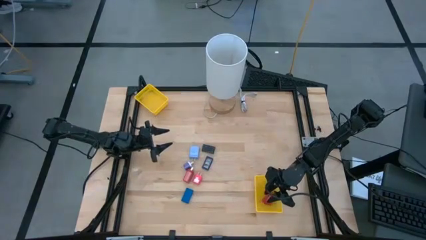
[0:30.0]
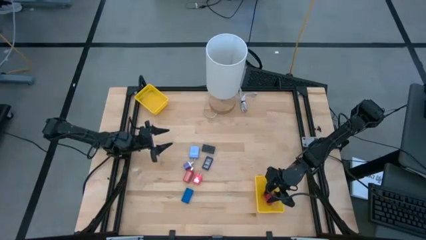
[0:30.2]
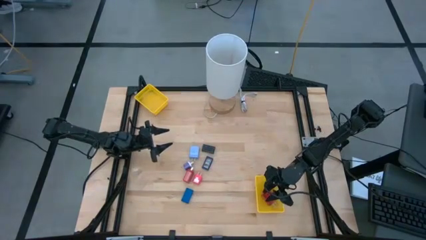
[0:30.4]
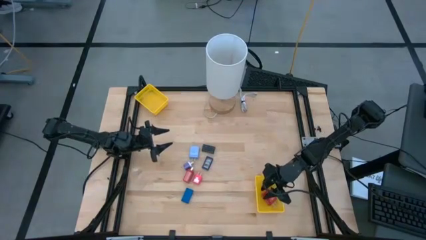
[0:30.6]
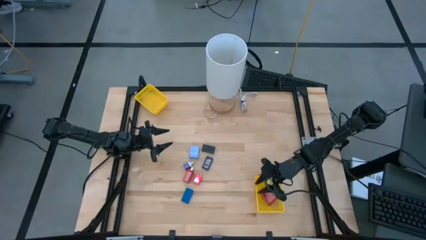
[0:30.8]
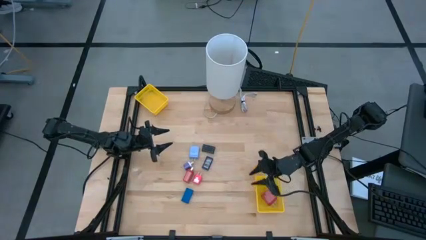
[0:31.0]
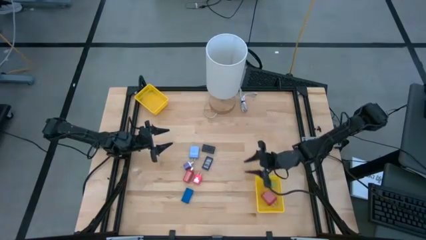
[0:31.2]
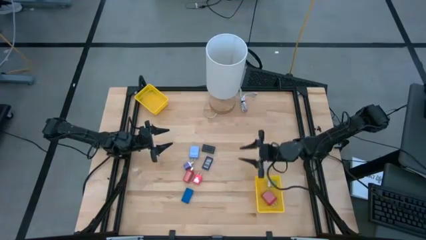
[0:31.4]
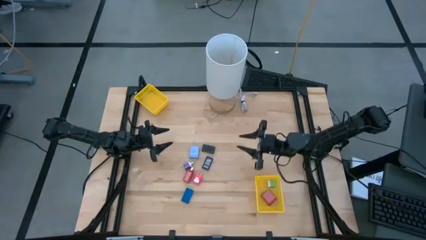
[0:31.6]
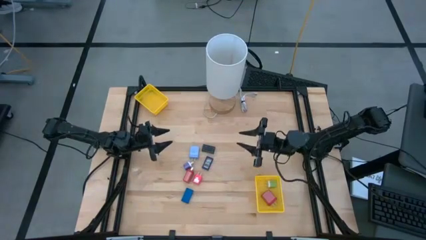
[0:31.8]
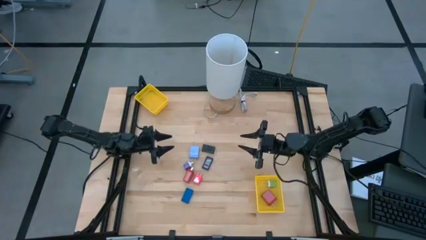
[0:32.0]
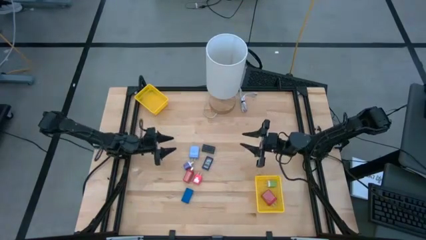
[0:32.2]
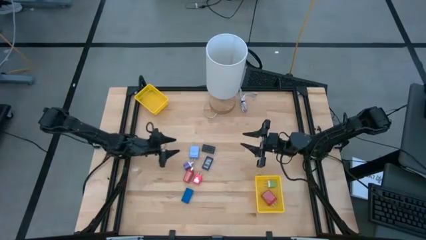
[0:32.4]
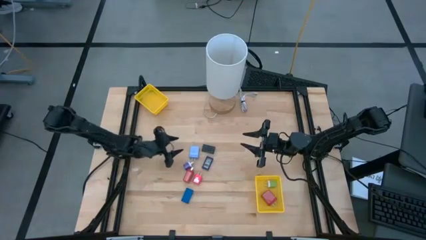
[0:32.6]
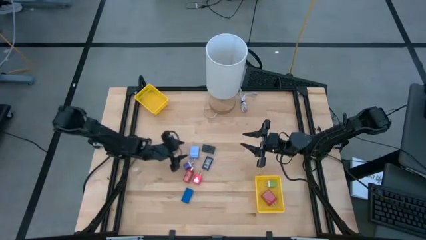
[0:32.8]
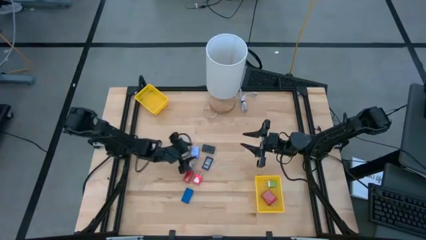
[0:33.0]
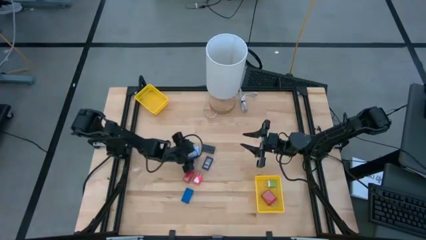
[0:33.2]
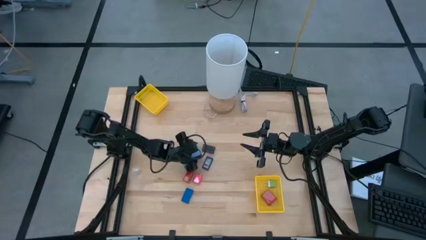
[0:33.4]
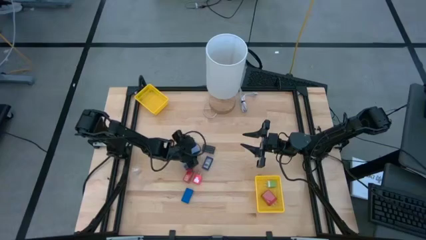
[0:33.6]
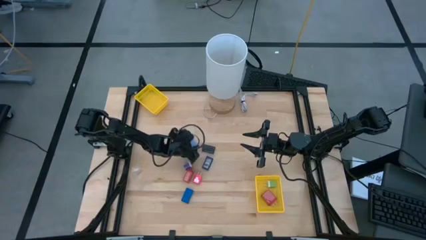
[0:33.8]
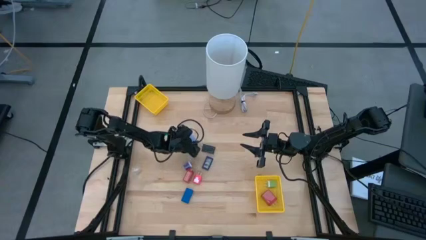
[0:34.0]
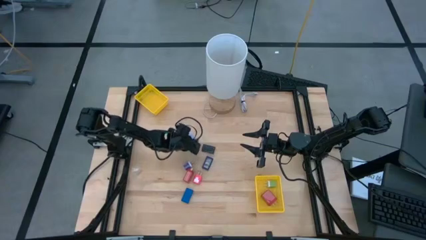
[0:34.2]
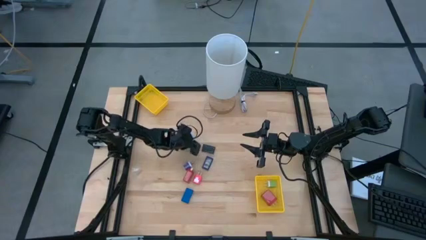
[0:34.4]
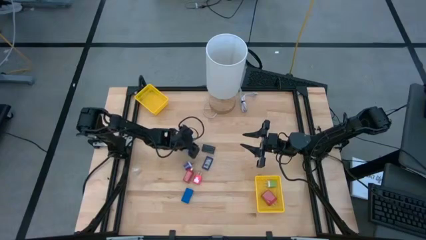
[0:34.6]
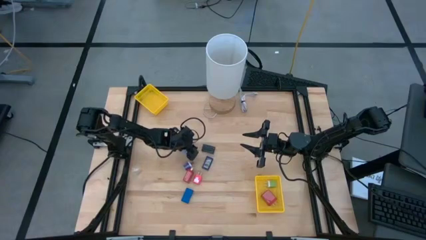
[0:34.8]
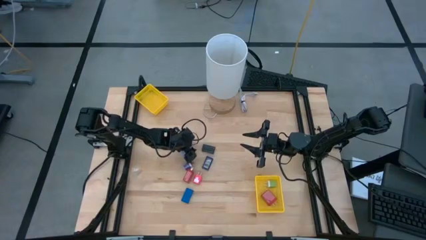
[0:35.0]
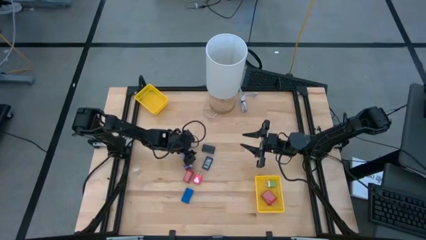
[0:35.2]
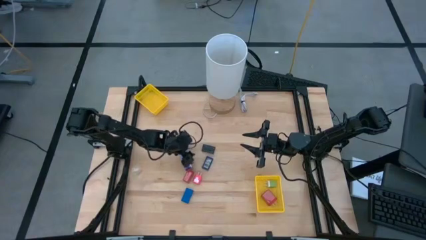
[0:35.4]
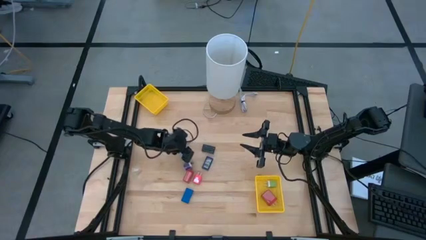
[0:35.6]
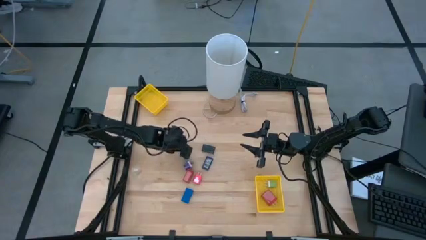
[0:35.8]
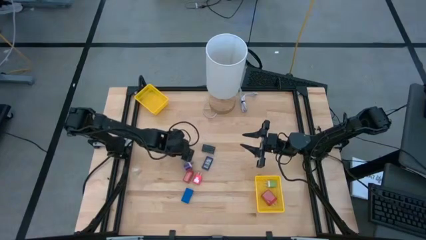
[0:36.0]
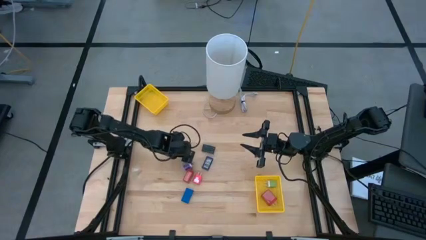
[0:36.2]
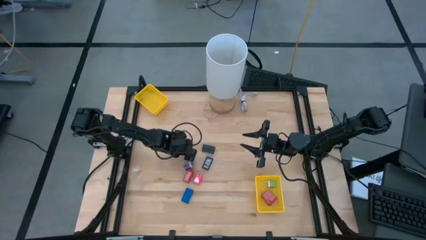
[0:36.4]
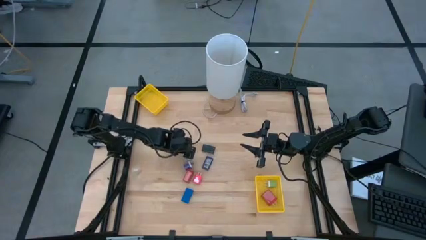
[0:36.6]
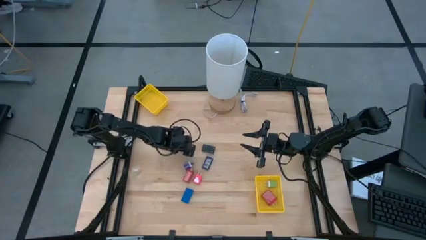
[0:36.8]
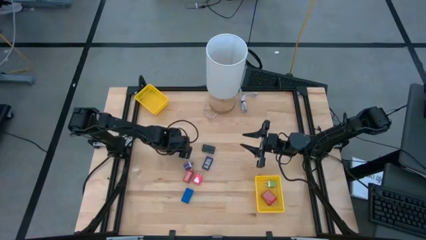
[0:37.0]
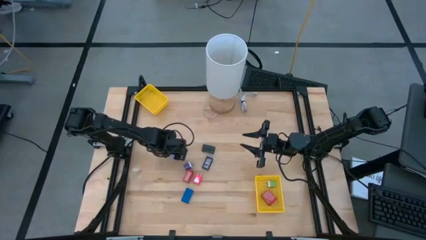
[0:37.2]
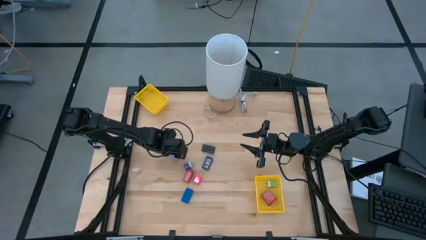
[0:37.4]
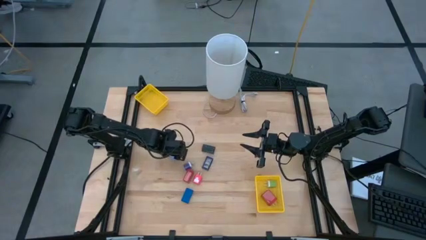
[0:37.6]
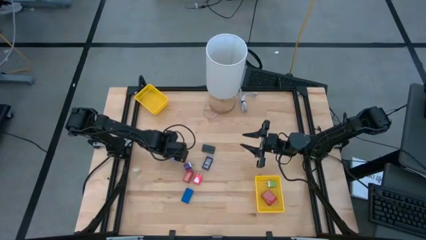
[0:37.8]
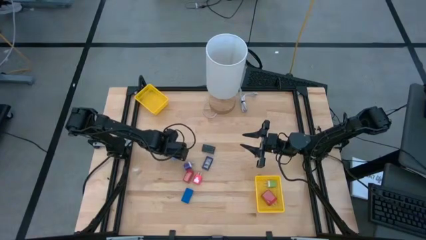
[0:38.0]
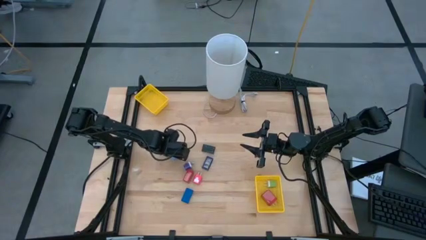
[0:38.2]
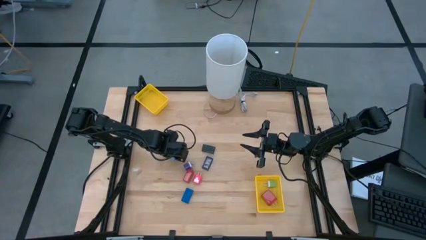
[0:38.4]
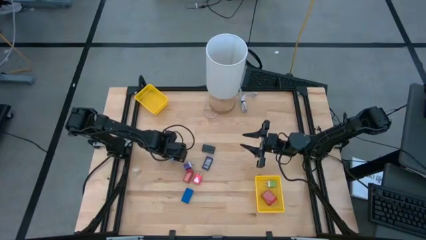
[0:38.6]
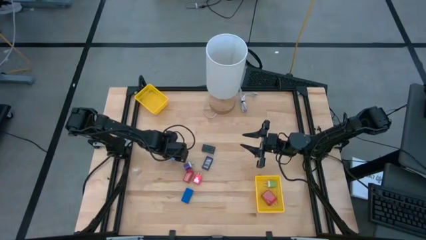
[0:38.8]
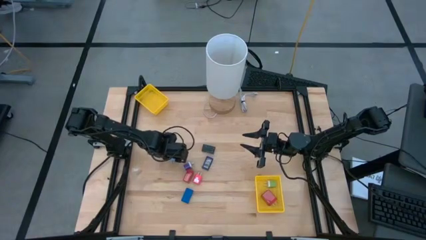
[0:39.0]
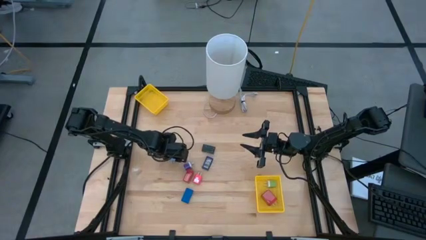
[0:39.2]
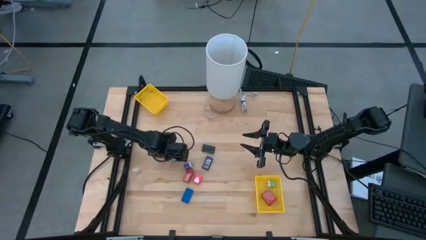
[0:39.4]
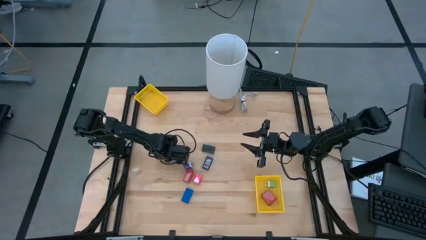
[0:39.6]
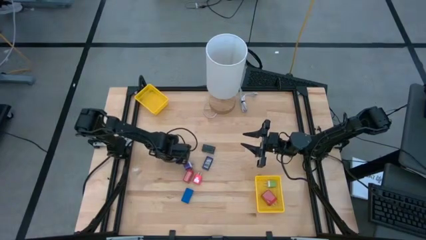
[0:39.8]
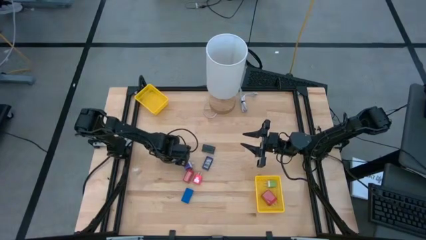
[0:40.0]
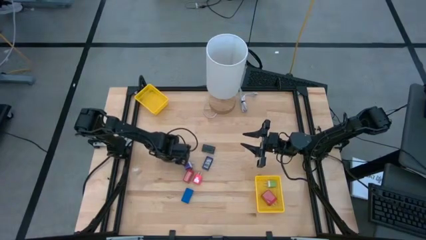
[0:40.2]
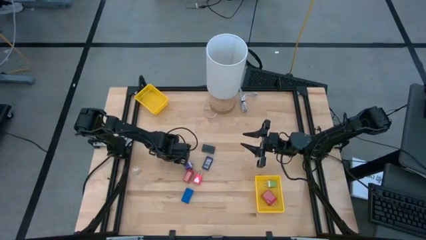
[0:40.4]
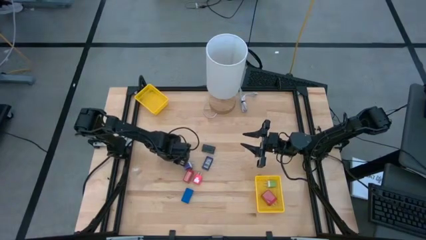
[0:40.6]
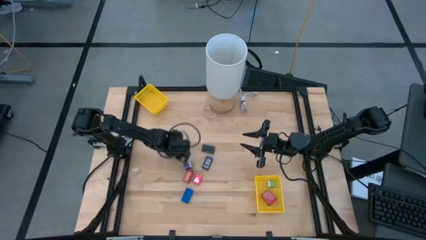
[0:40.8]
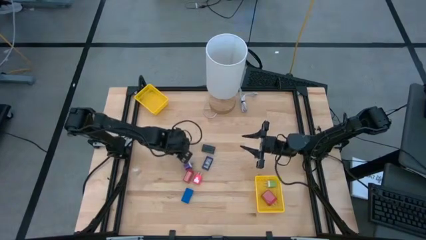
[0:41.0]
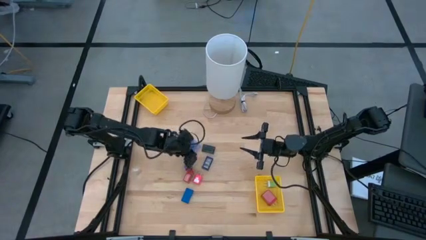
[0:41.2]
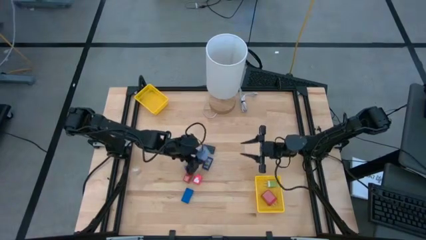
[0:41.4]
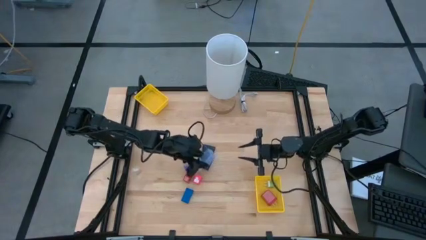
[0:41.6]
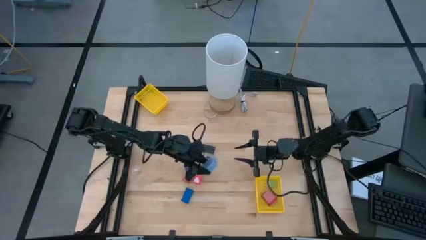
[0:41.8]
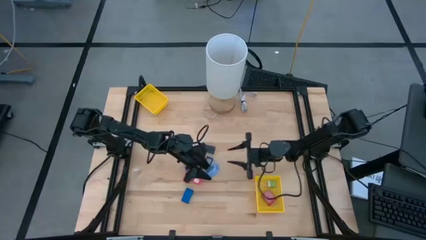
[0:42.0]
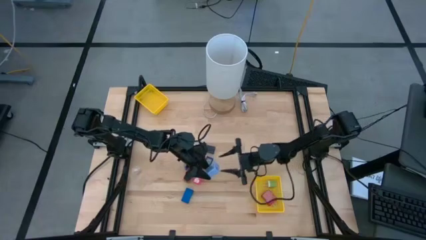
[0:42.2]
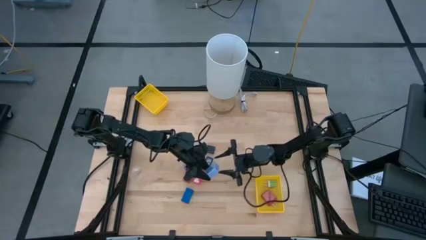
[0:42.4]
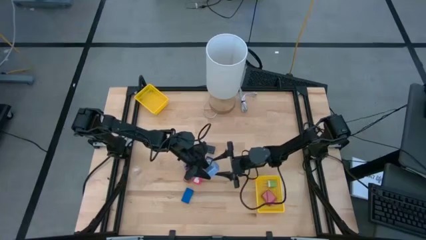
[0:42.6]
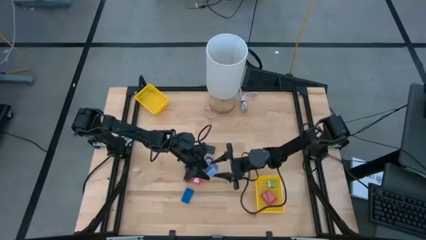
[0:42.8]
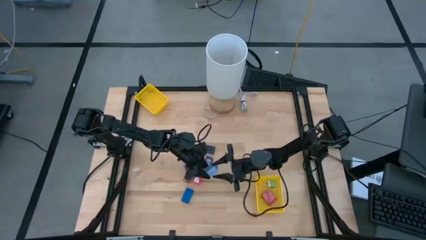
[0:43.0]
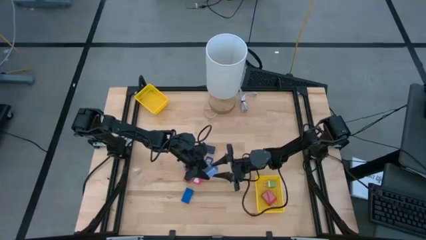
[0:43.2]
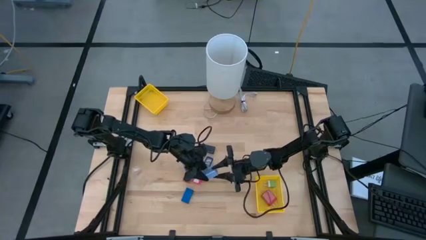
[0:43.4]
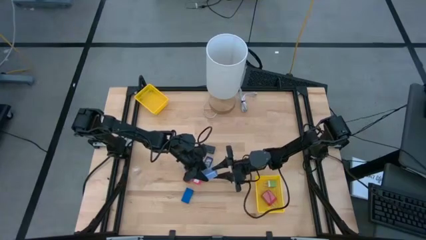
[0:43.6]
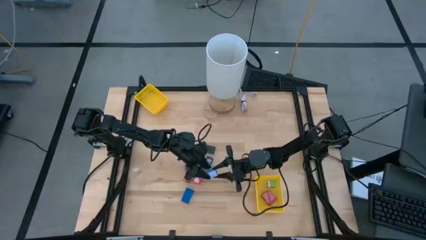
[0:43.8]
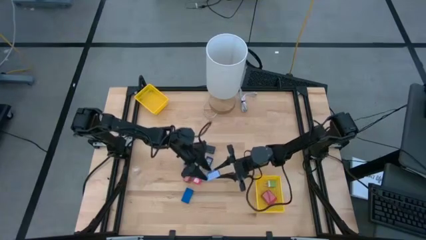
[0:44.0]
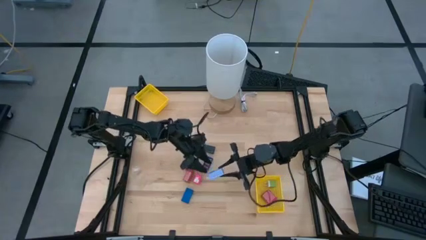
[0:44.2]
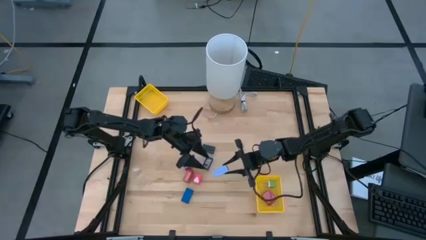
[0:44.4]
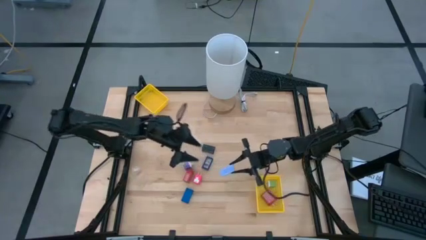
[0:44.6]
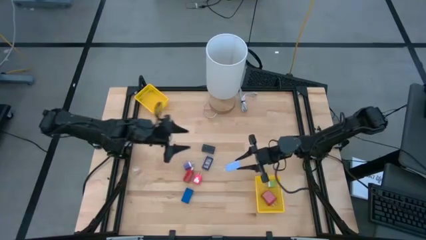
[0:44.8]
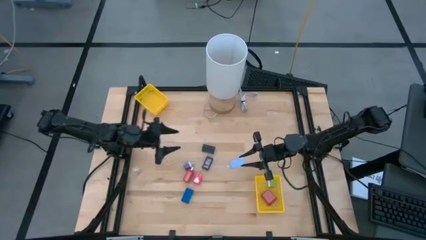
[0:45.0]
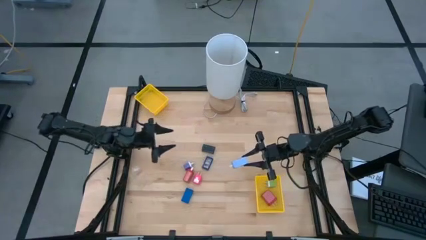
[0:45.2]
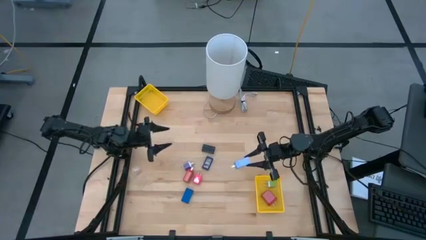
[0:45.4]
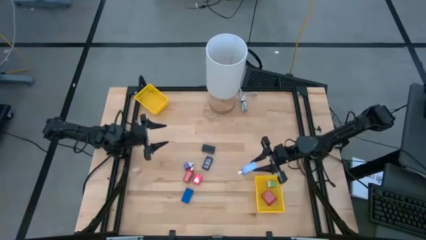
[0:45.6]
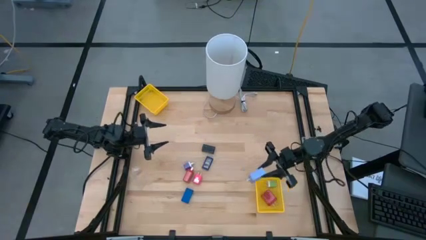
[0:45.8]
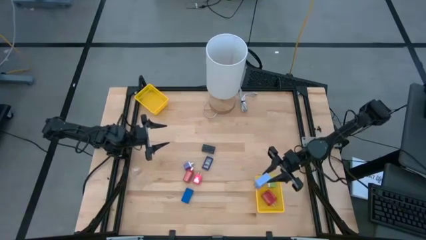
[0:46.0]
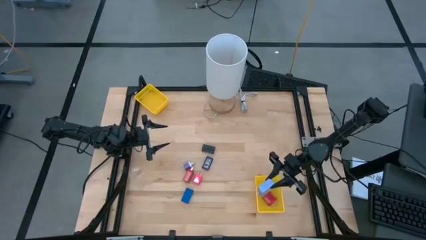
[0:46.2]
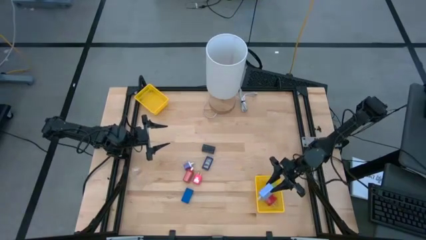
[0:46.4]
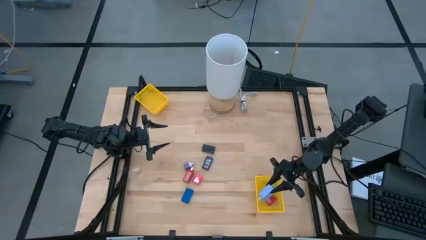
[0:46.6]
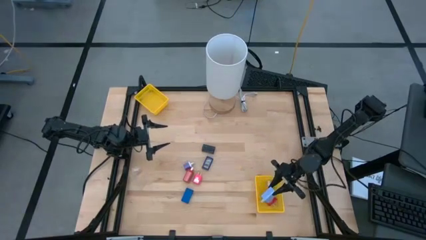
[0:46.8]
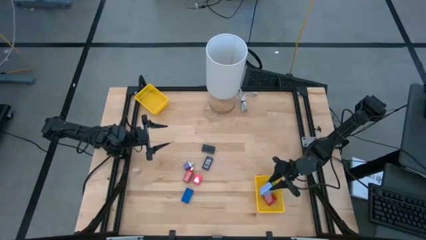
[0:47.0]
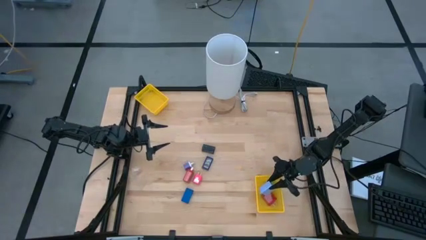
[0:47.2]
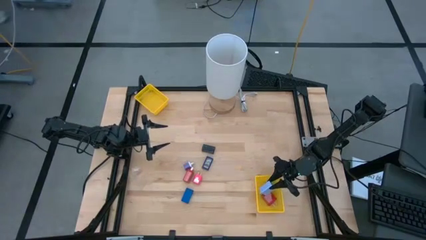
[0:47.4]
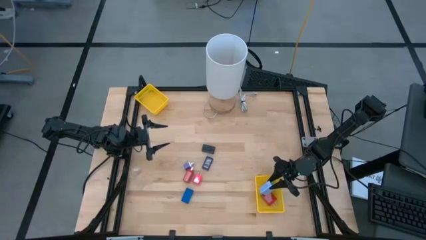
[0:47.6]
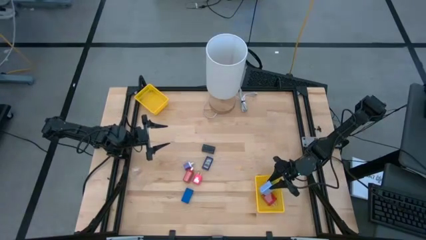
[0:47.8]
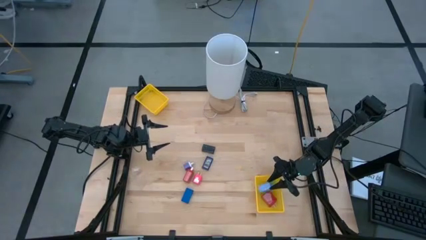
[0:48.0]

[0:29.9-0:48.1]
Task: Pick & Place Office items
Put the blue charger adapter into the bottom yellow bin
